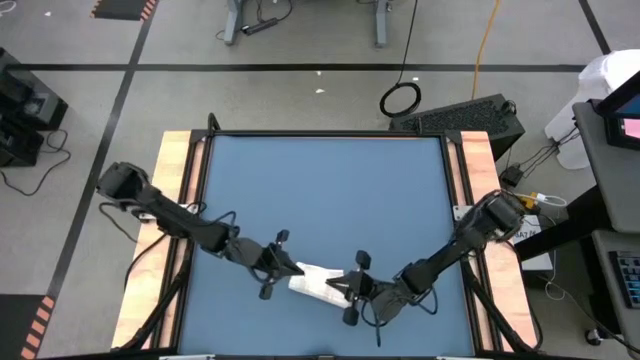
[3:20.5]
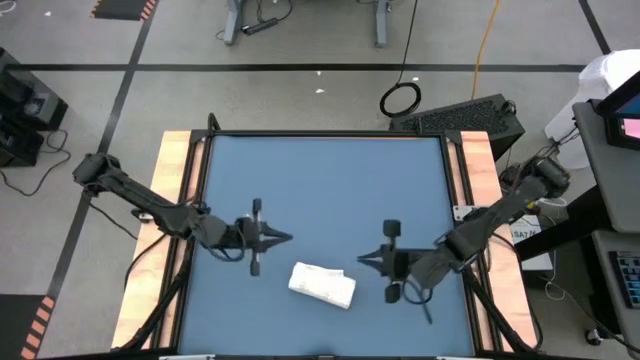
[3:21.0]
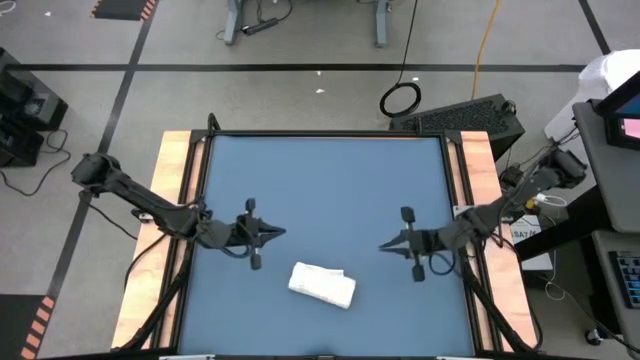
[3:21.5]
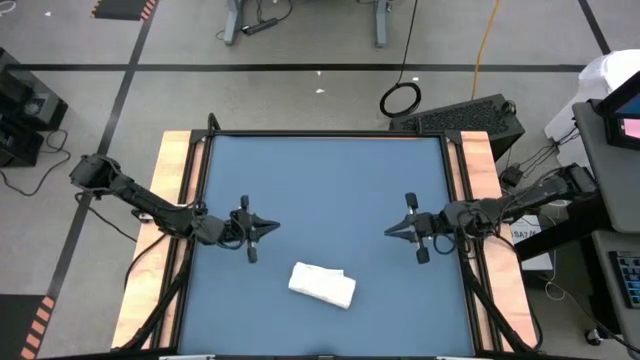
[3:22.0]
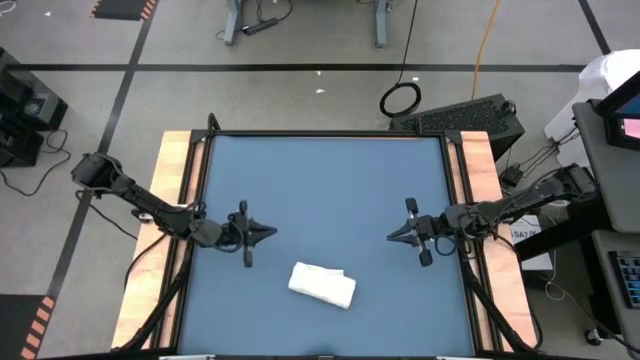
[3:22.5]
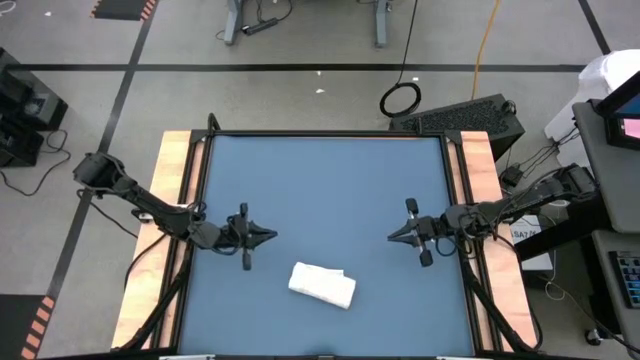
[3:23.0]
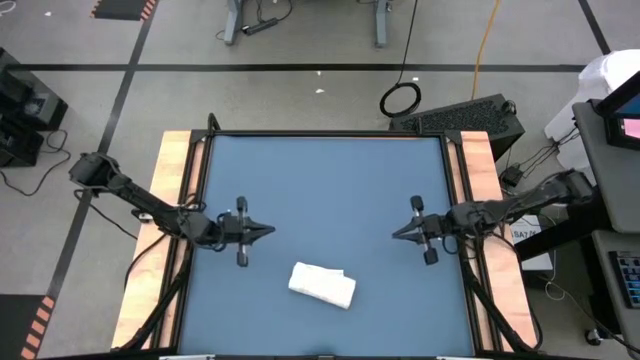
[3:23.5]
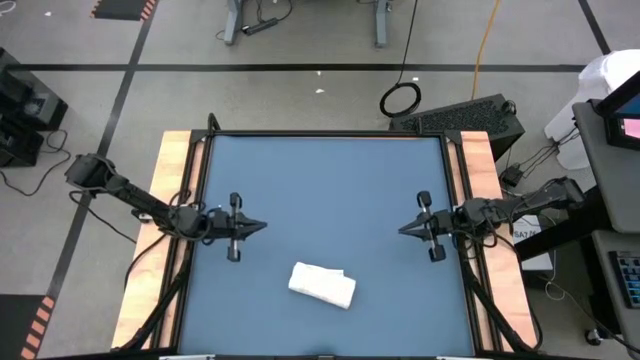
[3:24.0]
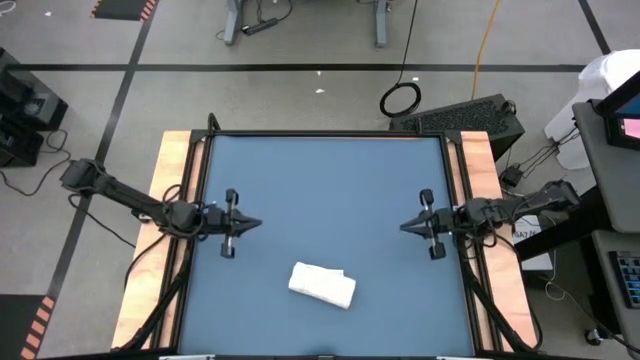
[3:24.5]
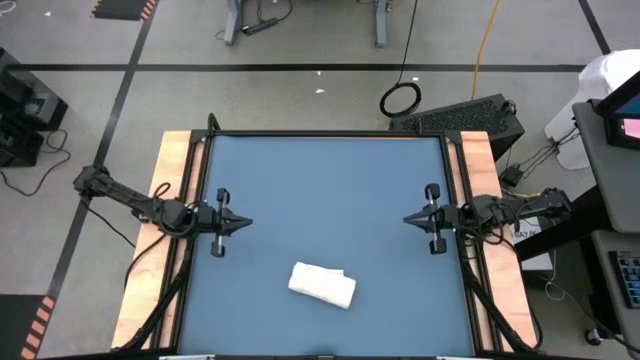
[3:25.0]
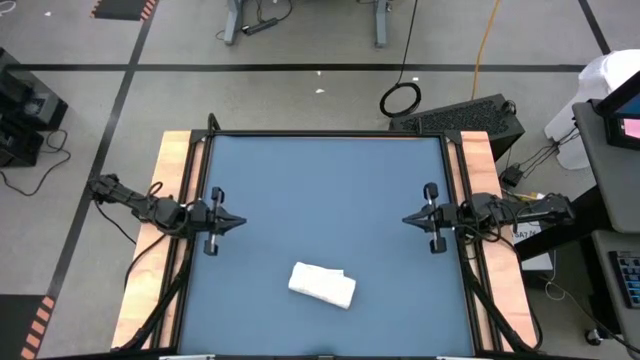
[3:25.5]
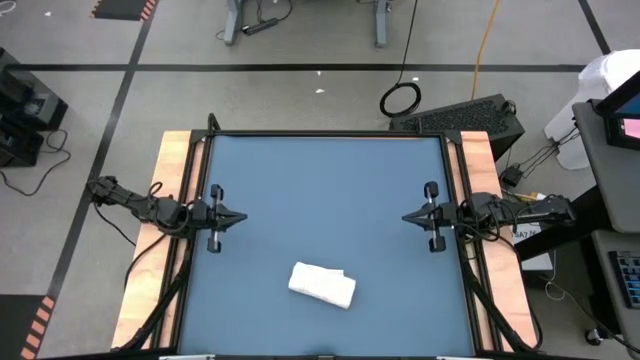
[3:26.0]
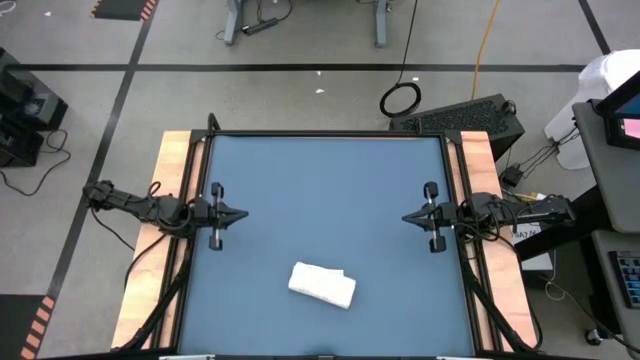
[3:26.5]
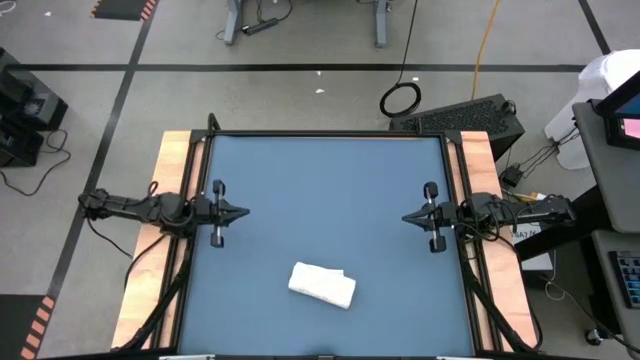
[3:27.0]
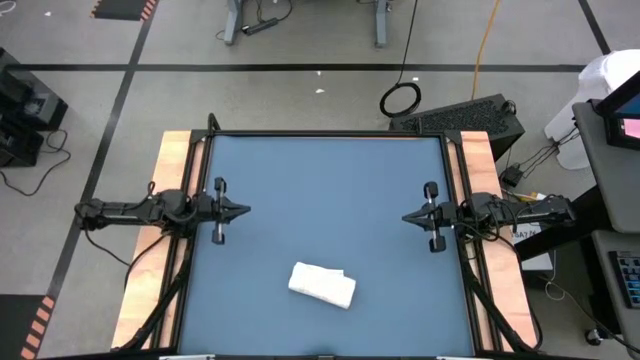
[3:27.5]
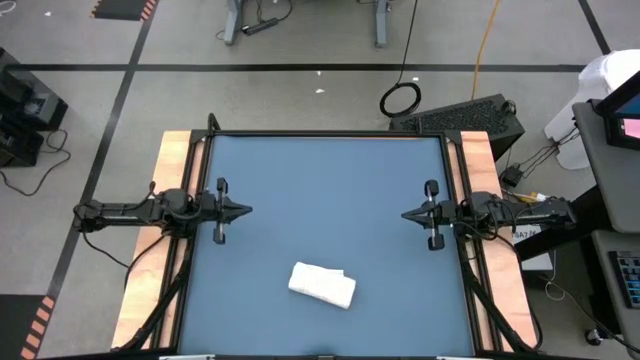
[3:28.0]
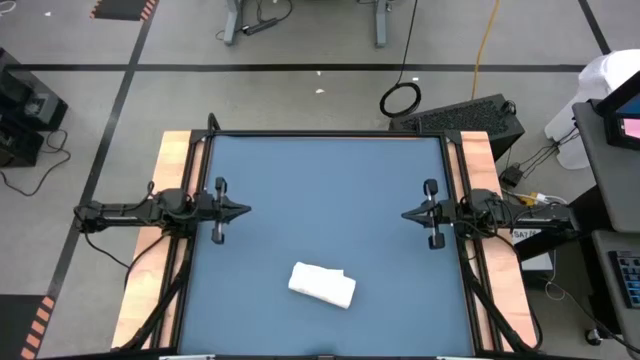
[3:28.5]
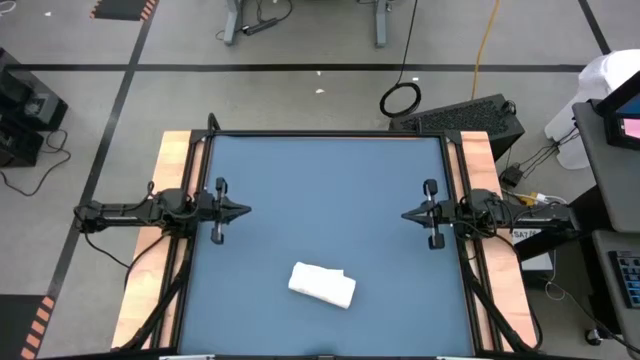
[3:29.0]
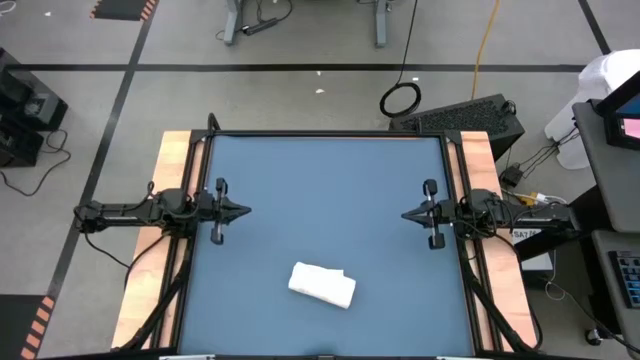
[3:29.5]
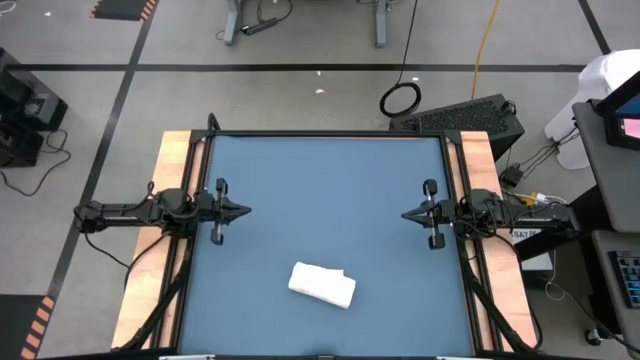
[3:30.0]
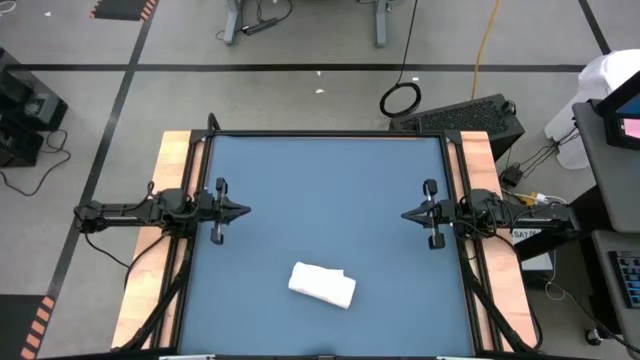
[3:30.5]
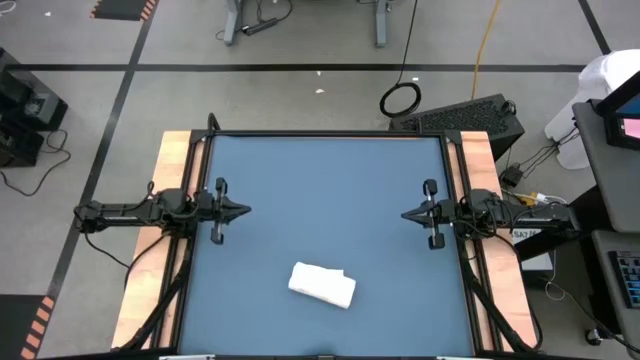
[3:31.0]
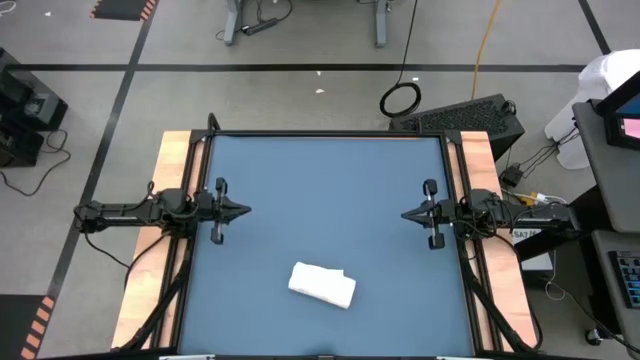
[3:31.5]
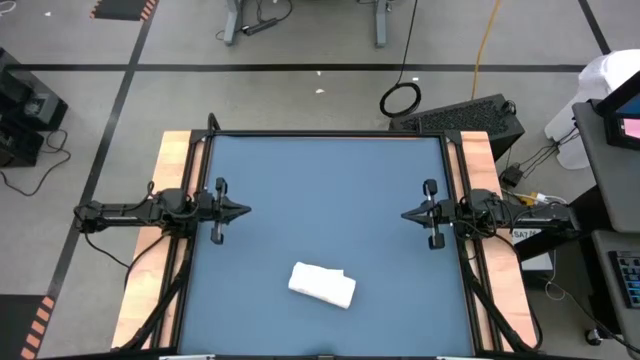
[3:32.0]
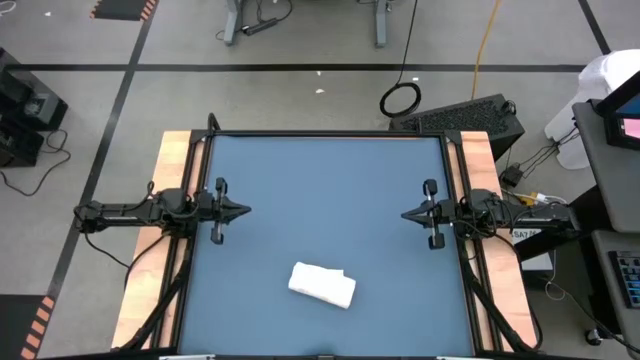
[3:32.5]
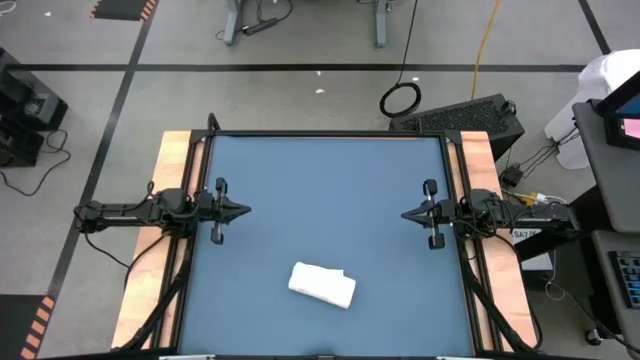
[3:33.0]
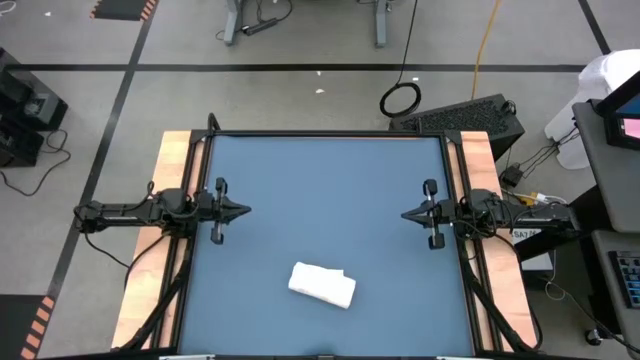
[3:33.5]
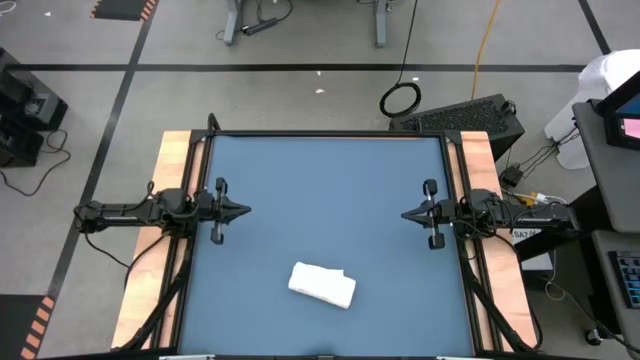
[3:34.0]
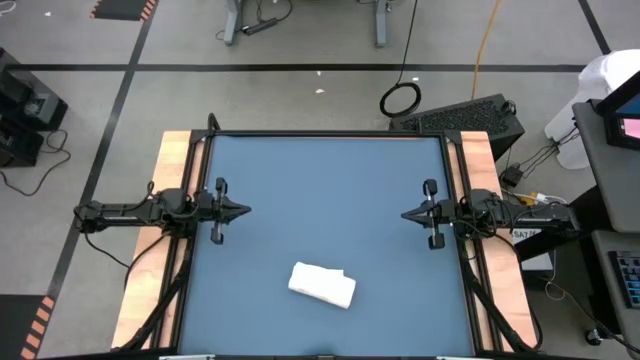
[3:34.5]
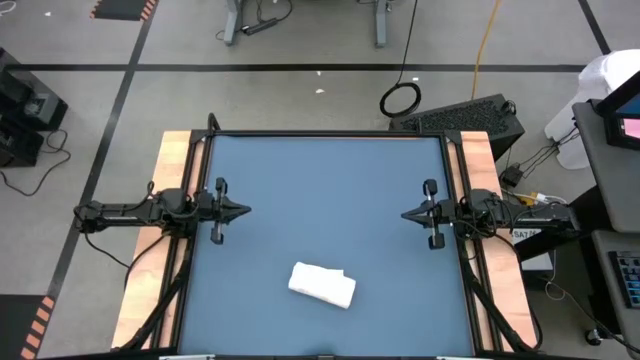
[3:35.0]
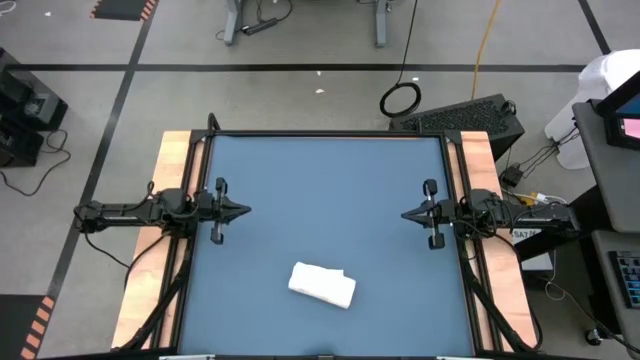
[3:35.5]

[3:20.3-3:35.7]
Task: Roll towel
Return to Home Position

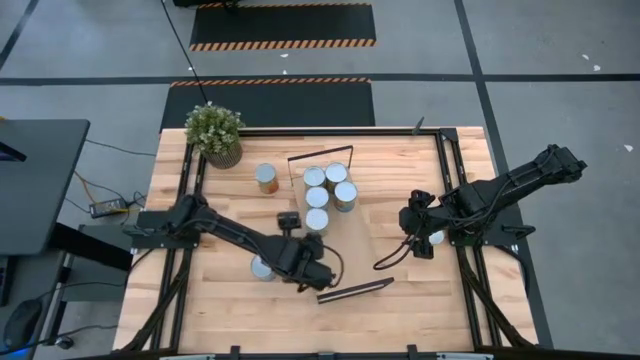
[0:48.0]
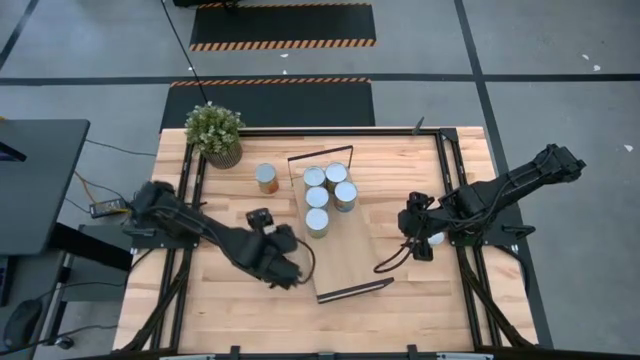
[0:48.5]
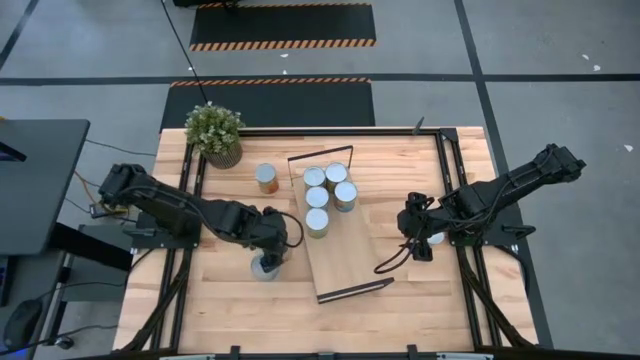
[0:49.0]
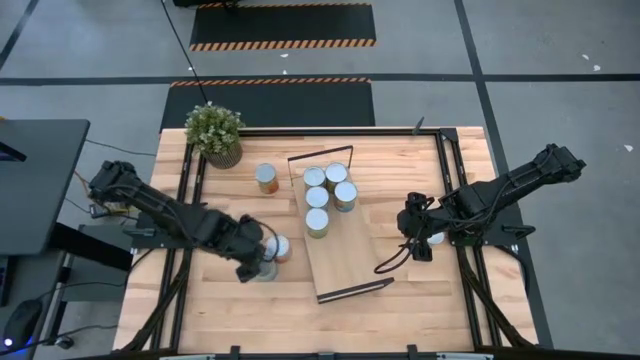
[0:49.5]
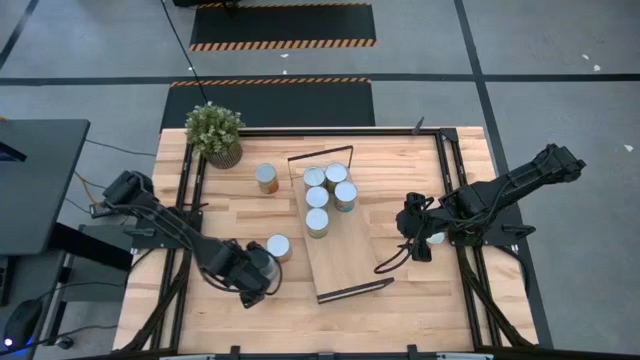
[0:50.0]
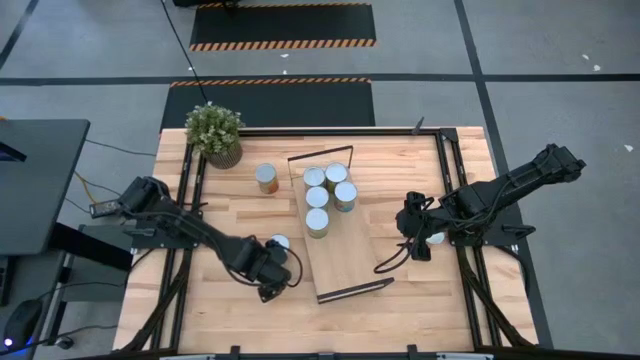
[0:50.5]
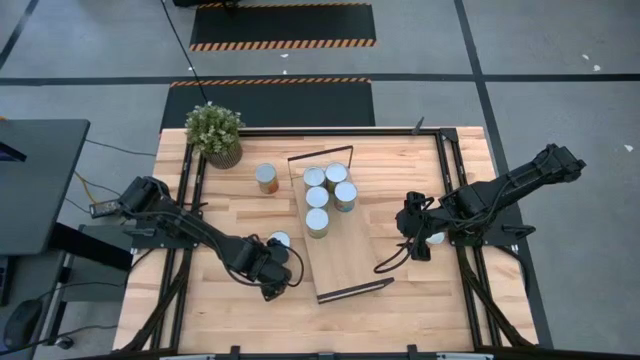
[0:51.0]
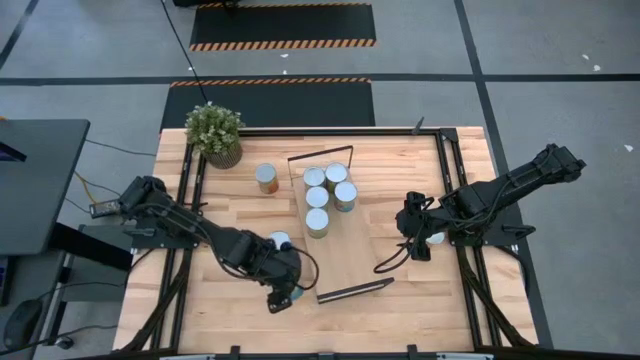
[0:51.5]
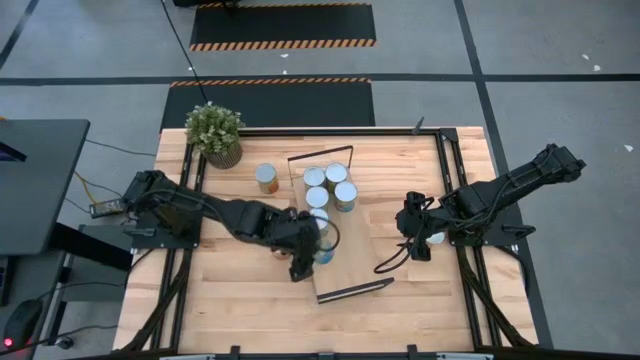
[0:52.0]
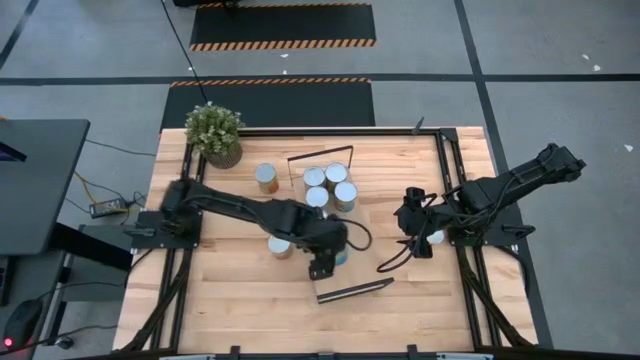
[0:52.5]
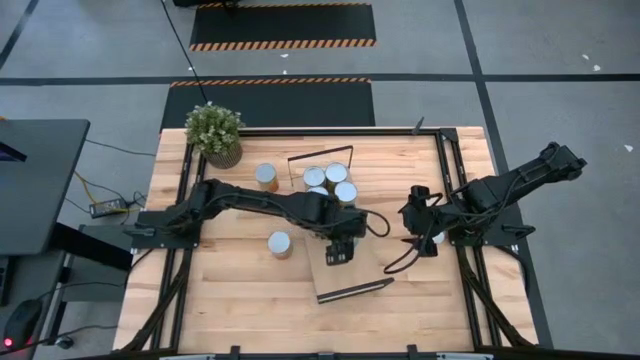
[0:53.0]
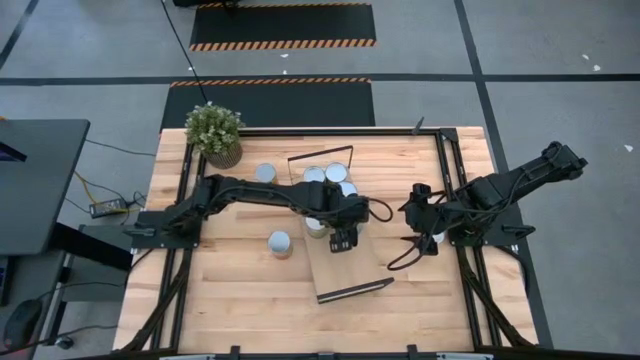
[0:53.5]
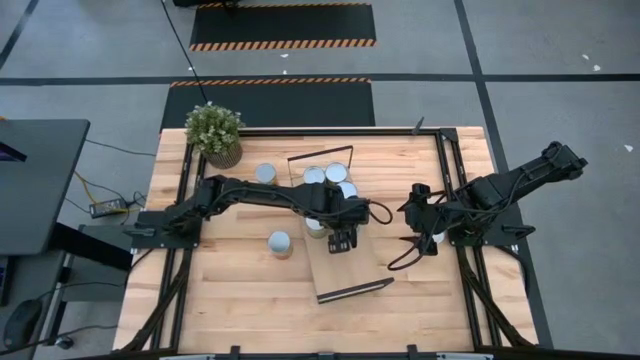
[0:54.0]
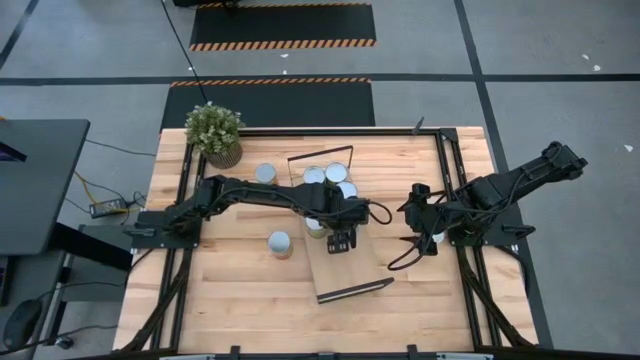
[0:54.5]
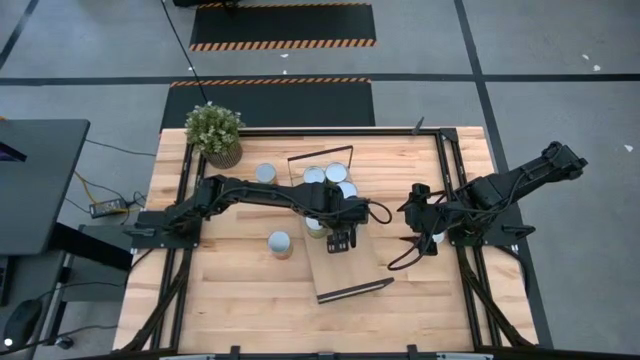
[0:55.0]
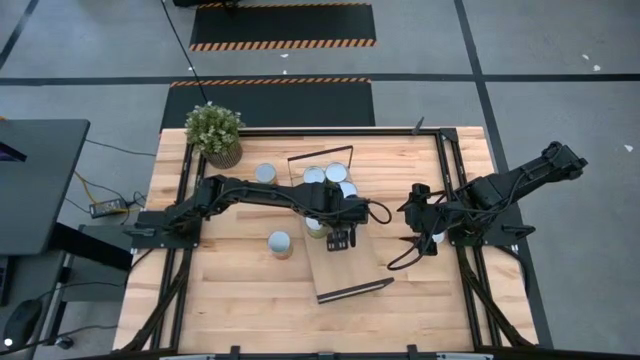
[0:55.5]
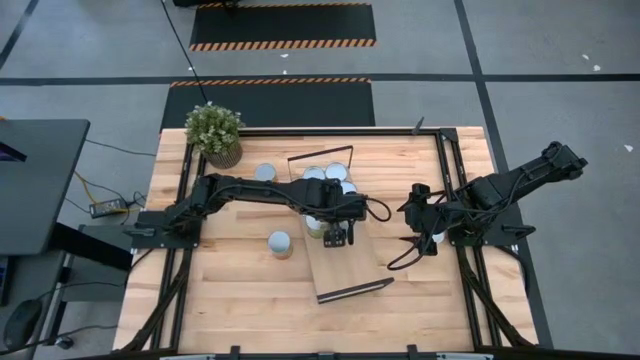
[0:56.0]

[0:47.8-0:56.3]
Task: Pick and place cans onto a shelf
Put the canned cherries on the shelf
